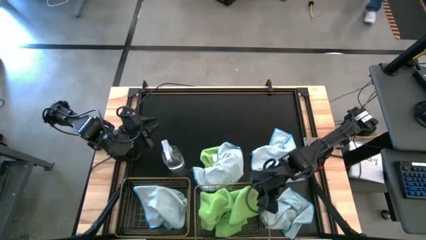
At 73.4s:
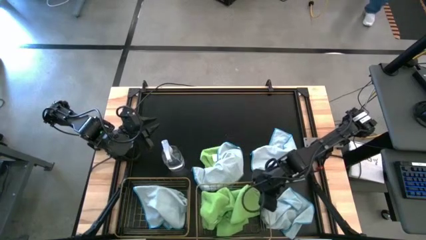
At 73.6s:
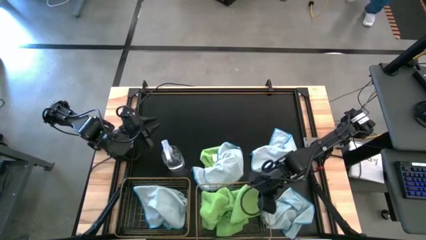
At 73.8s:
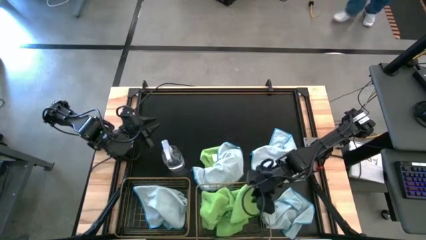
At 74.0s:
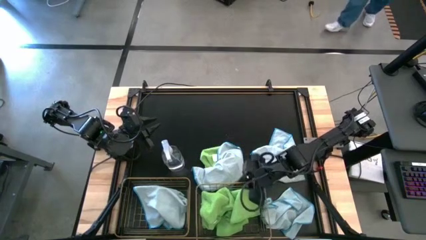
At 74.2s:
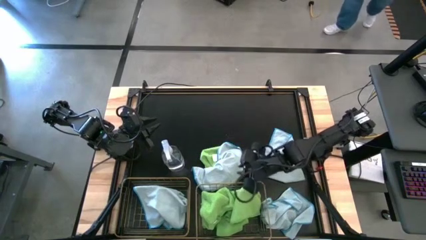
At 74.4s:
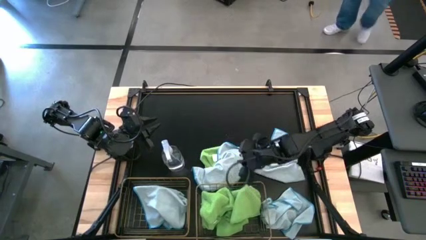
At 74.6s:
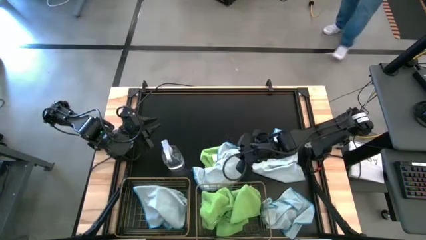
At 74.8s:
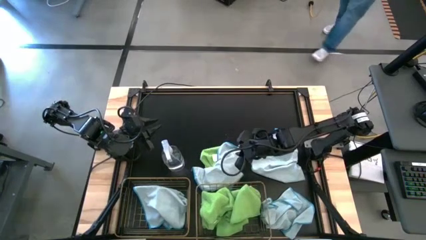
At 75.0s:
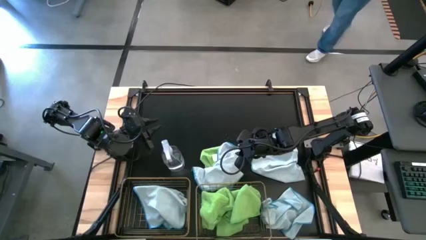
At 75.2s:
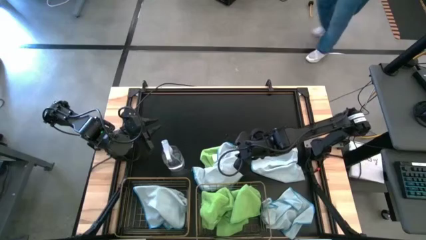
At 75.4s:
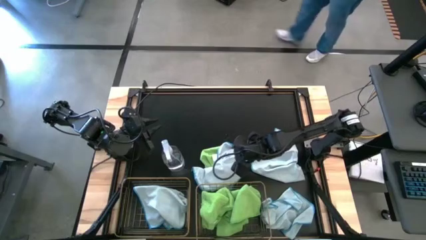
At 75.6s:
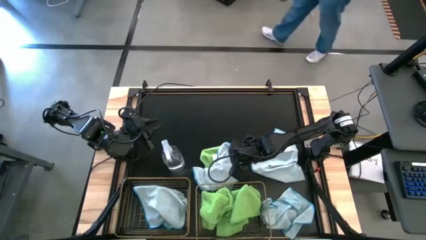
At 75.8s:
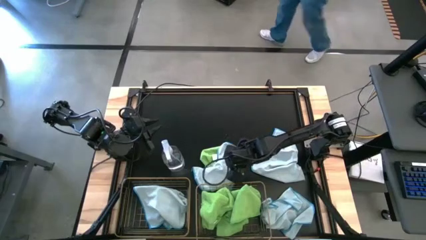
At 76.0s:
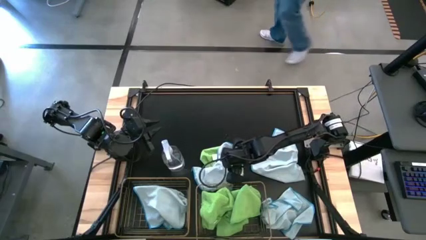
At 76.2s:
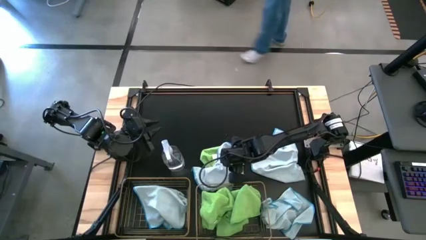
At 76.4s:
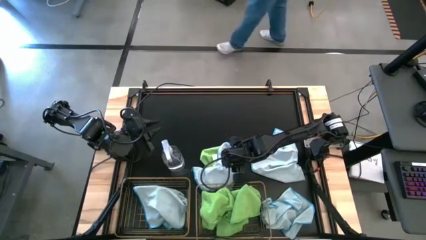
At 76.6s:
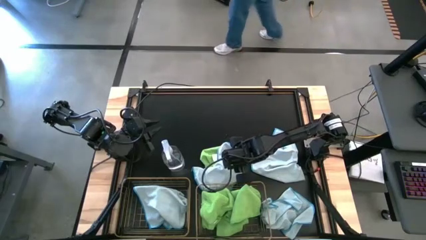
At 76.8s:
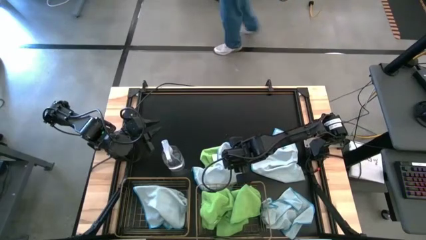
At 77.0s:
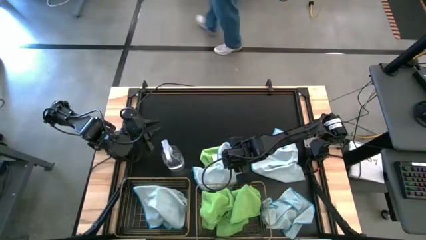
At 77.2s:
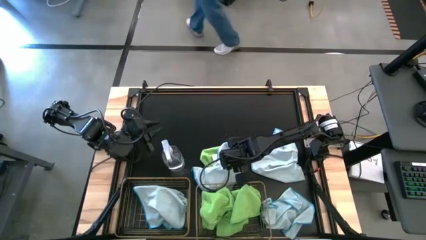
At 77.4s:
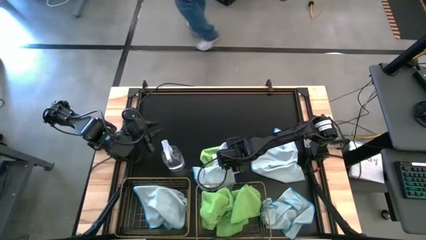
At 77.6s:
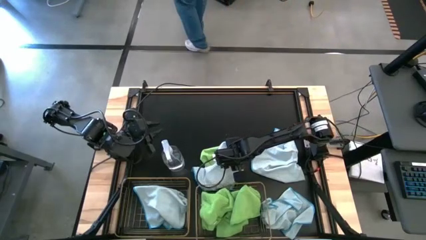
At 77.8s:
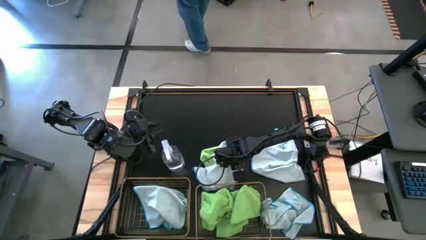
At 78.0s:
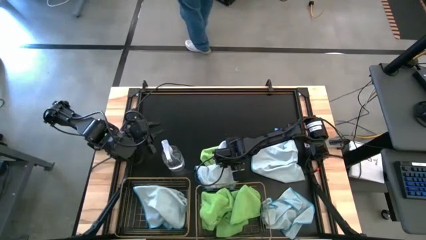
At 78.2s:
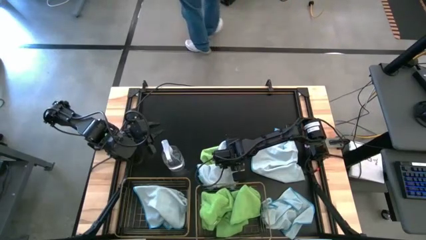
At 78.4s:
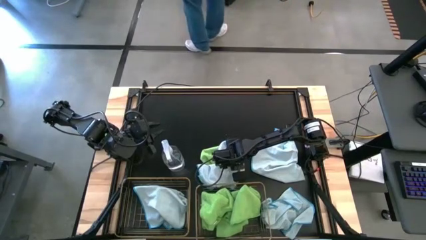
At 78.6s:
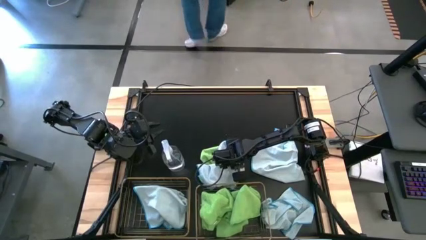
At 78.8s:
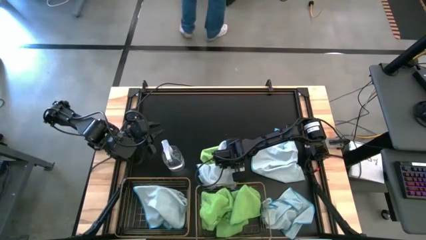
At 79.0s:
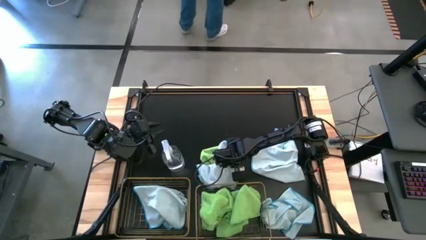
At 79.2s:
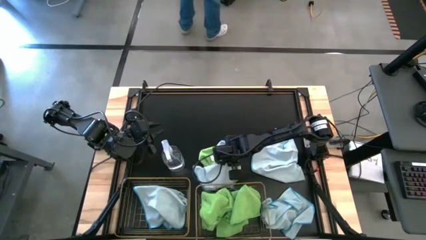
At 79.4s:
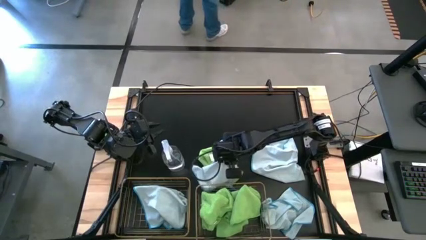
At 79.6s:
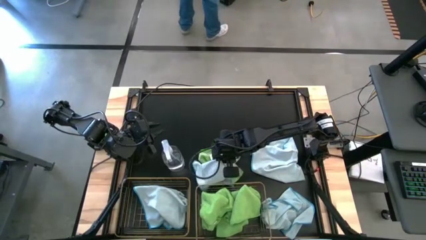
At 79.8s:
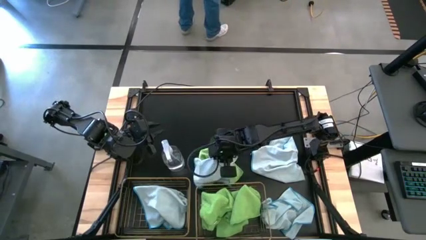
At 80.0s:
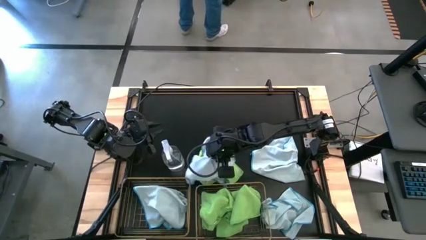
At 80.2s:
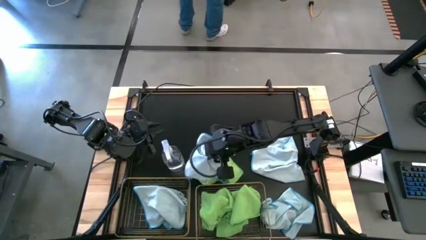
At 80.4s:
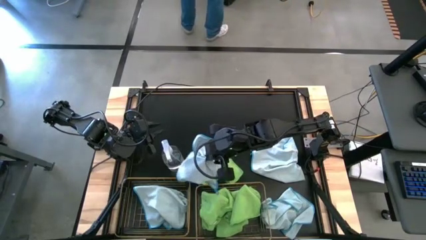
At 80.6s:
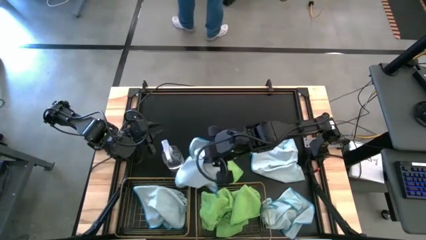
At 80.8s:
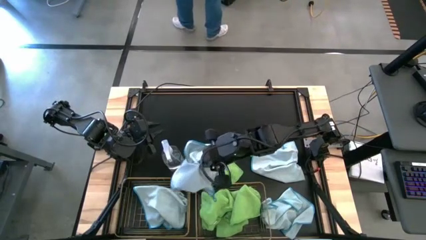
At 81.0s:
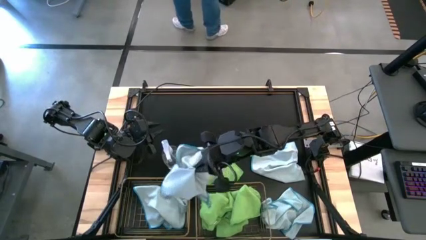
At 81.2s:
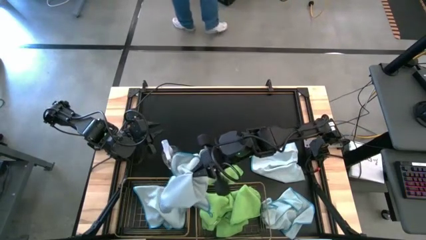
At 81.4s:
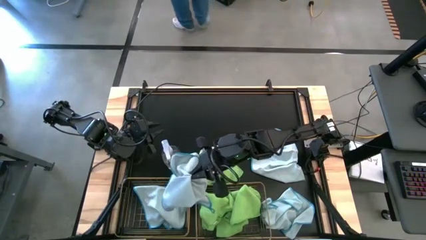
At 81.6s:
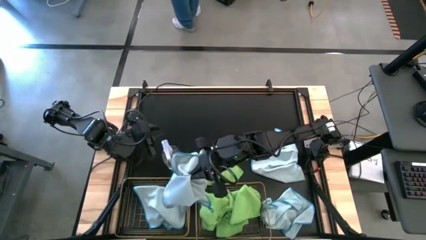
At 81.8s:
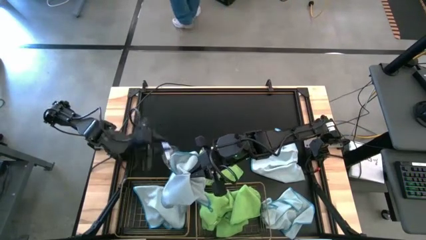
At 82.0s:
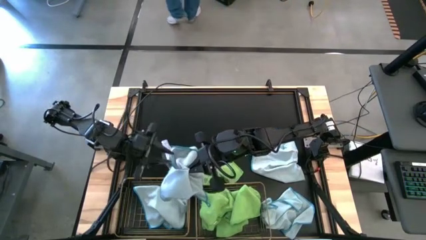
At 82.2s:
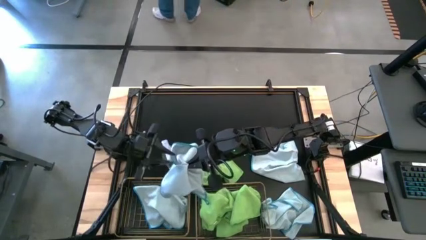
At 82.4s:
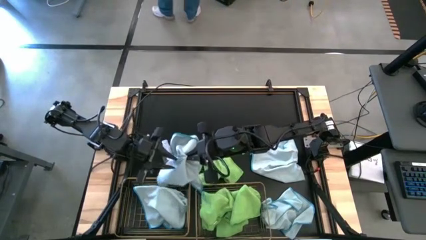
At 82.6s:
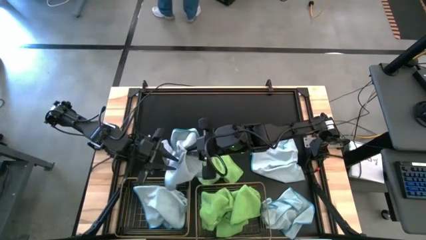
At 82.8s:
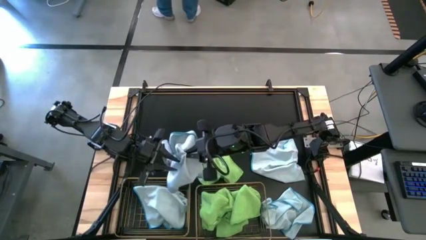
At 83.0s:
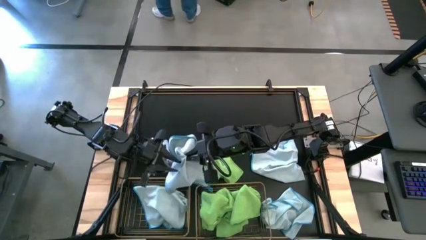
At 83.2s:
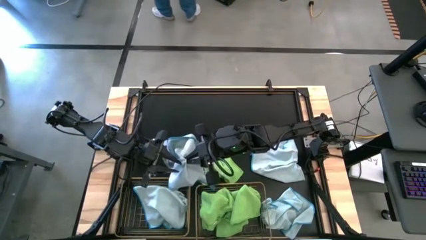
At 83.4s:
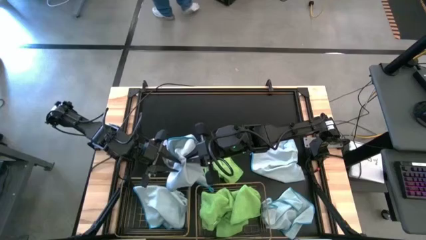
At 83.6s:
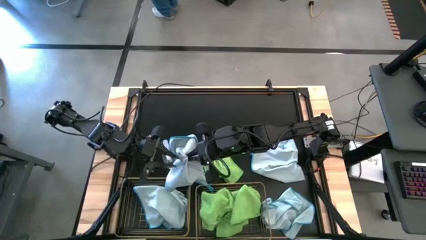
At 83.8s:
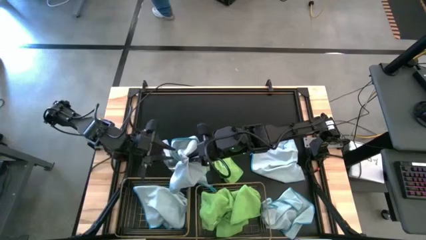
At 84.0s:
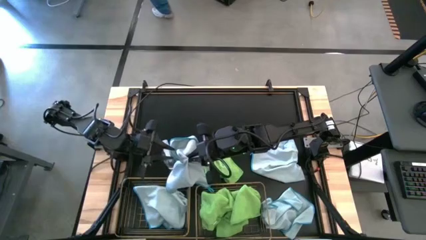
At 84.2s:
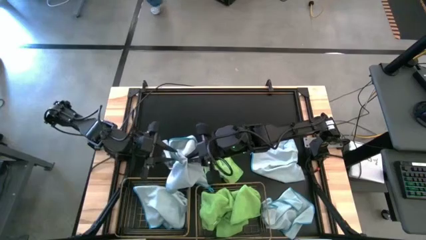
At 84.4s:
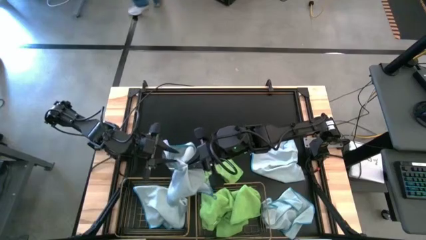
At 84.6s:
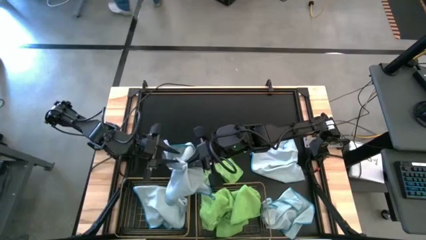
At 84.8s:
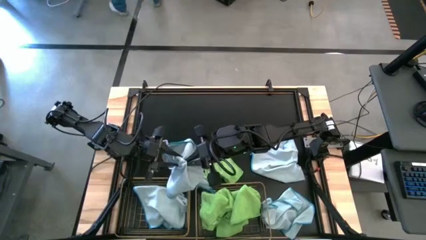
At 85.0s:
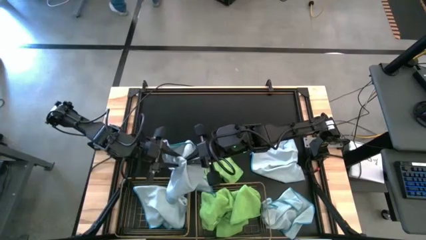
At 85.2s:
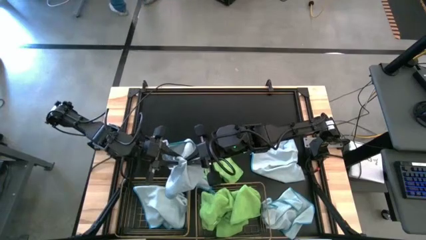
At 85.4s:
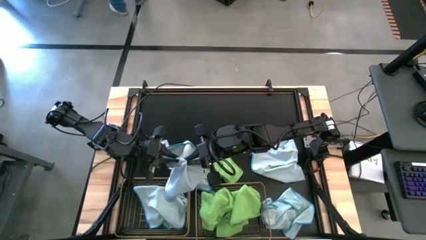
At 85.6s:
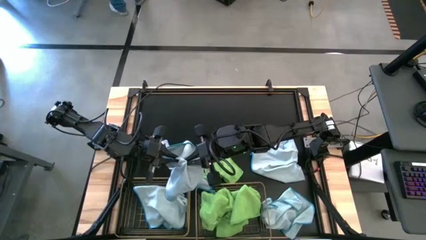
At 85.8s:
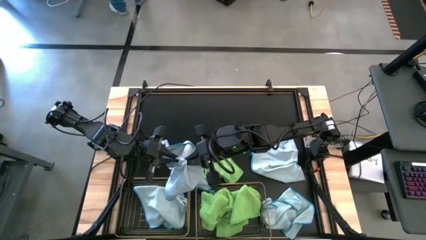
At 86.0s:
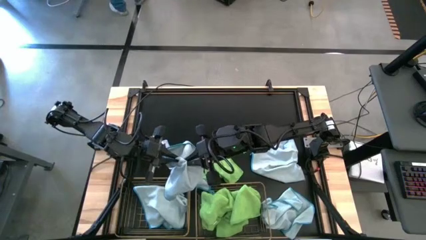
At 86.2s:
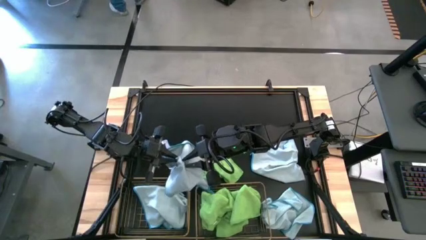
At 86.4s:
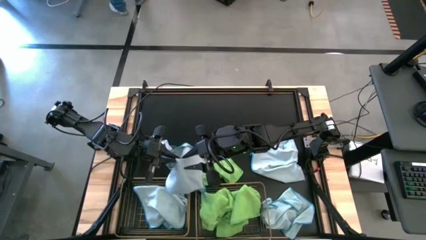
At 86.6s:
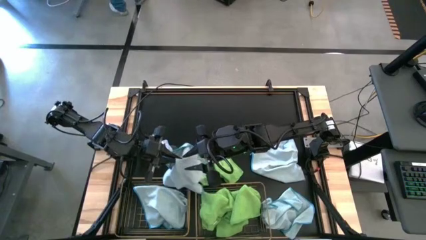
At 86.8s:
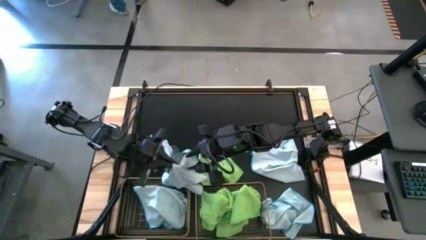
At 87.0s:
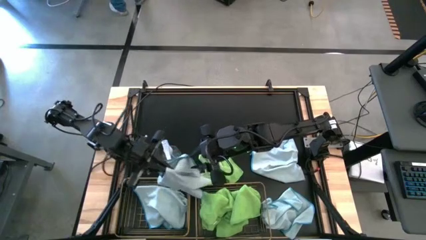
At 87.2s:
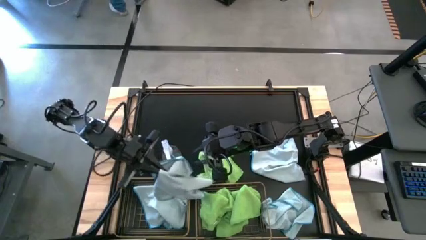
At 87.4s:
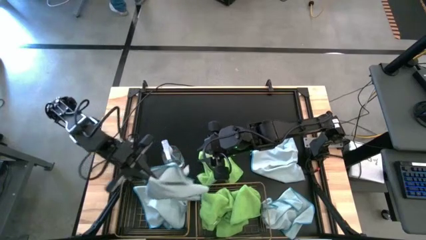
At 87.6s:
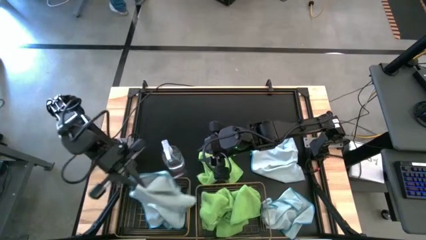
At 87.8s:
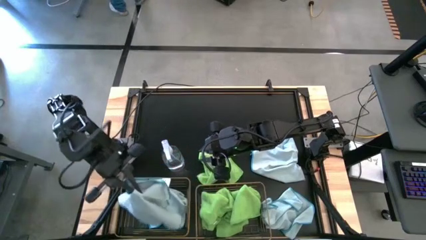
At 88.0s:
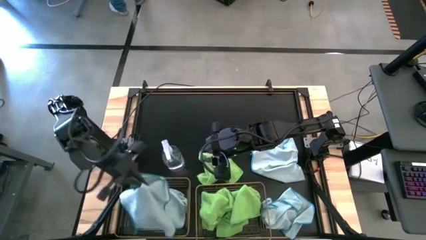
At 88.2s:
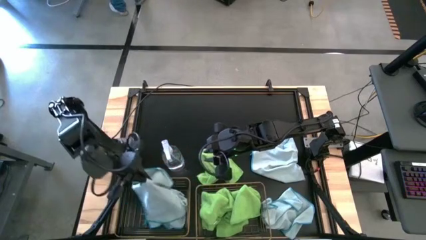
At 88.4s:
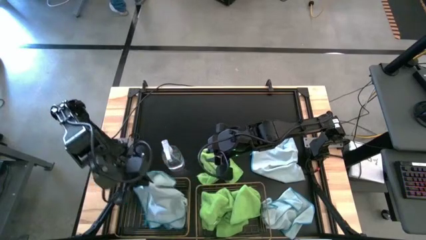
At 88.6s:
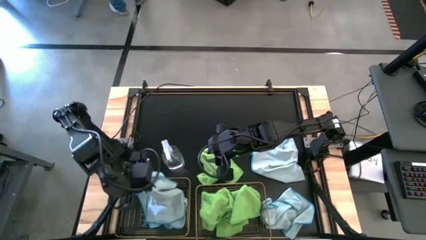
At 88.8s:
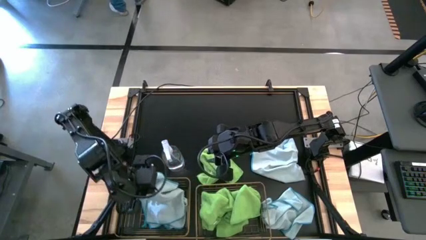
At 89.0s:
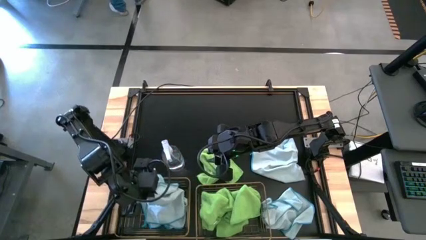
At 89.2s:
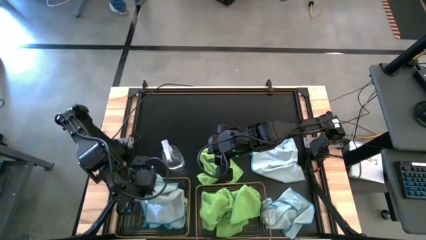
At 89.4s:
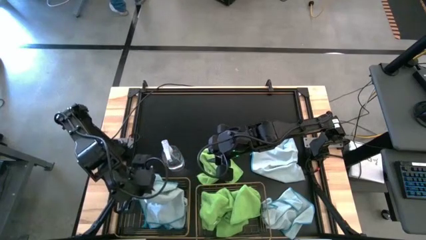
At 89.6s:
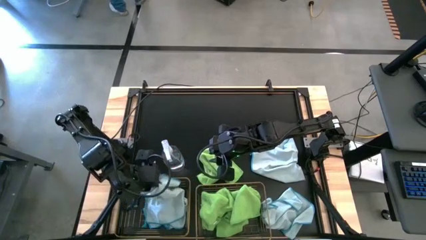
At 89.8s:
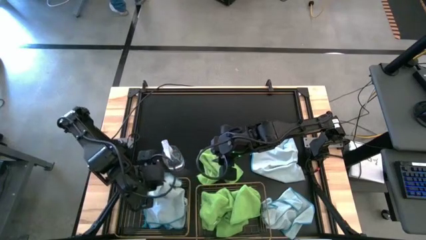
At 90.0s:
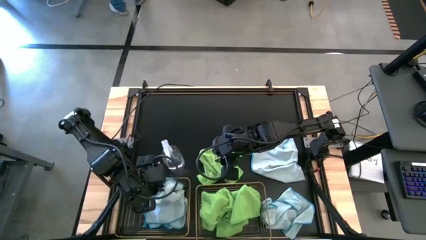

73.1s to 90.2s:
Task: Sort microfiber towel by color & place in baskets
Put the white microfiber cloth into the left wire basket
